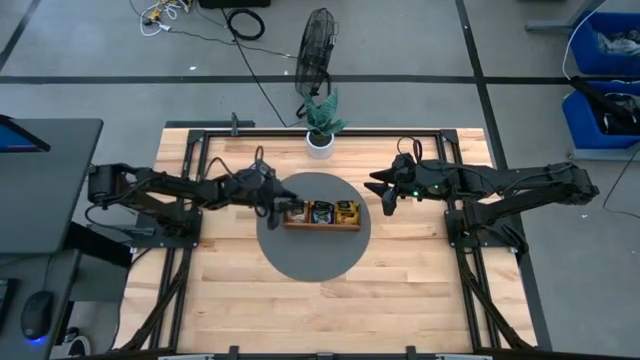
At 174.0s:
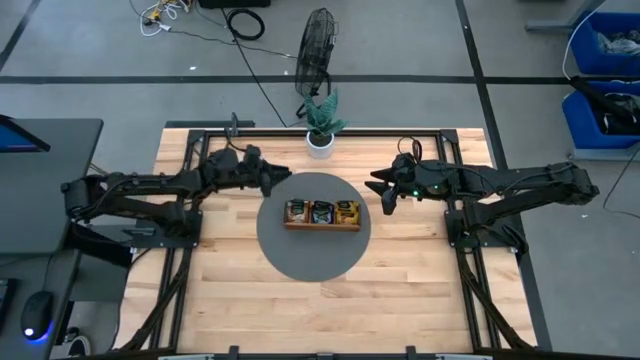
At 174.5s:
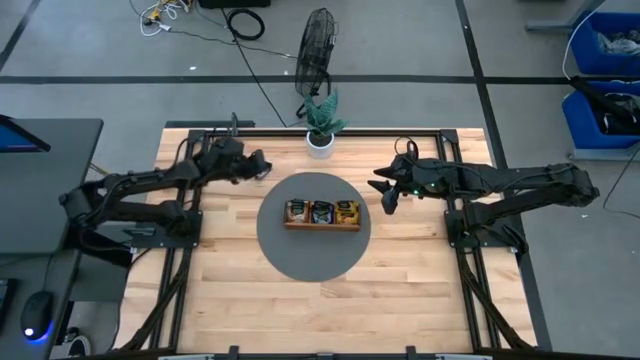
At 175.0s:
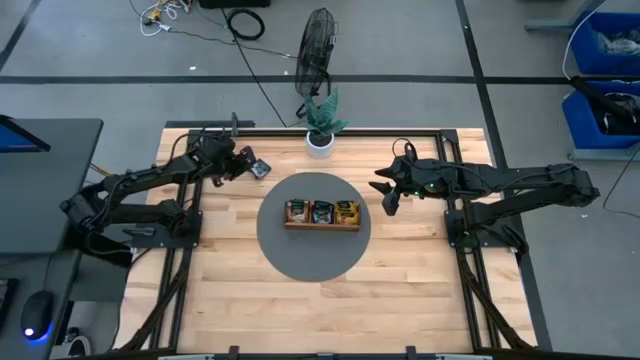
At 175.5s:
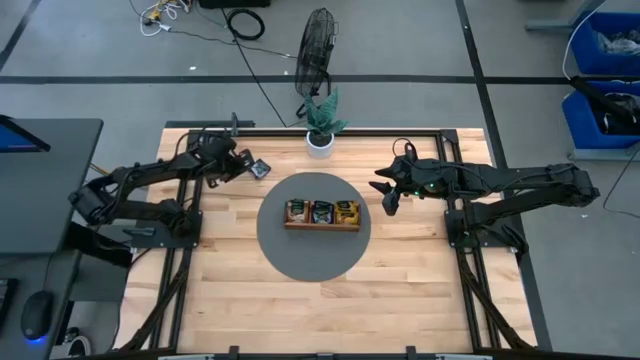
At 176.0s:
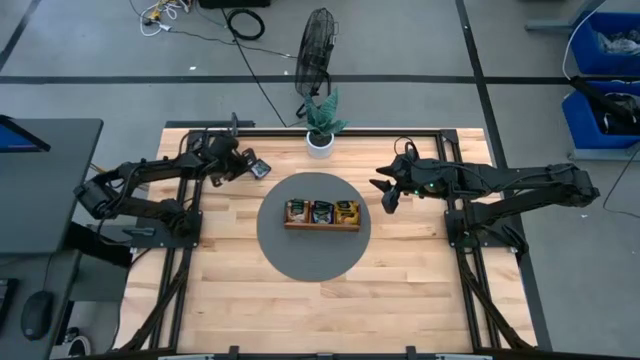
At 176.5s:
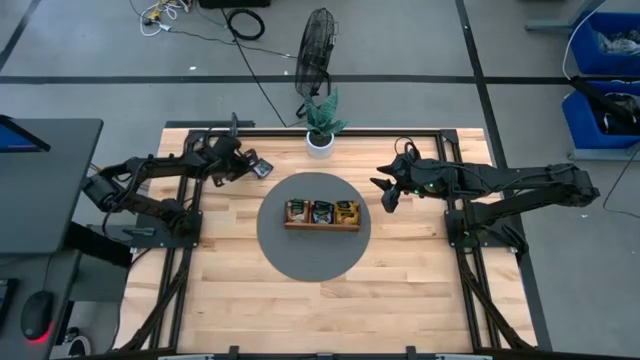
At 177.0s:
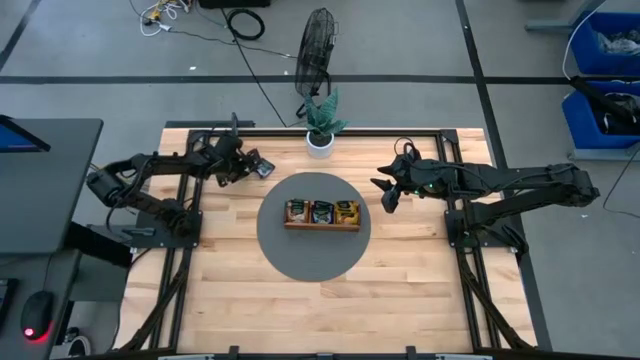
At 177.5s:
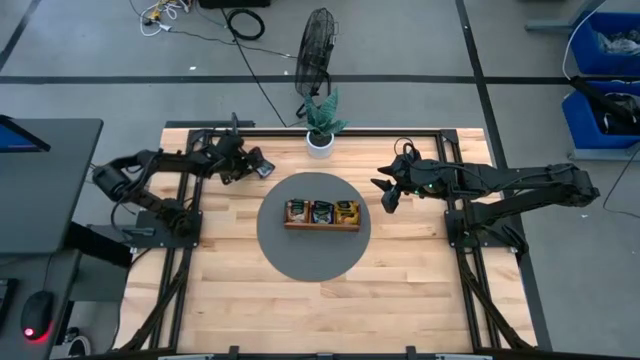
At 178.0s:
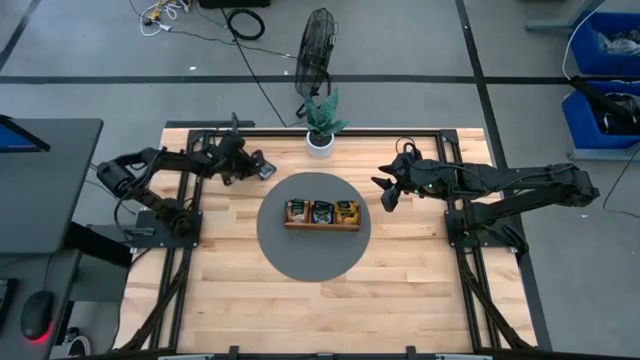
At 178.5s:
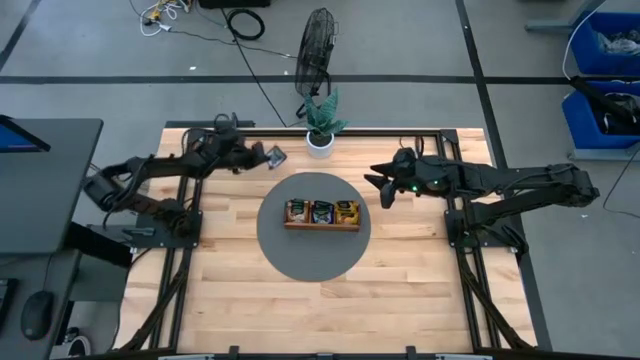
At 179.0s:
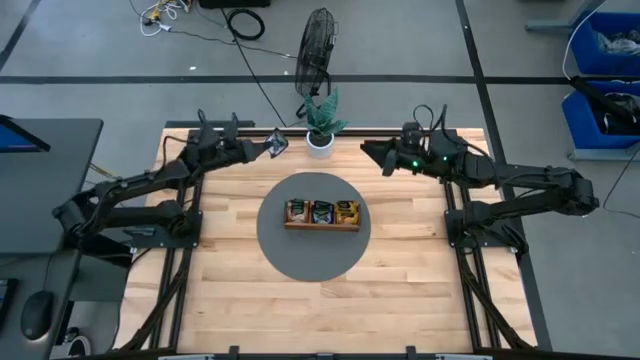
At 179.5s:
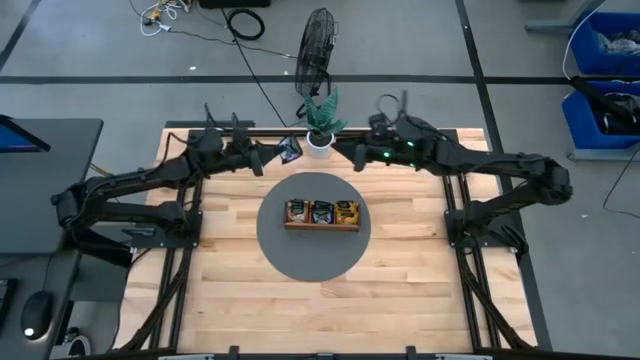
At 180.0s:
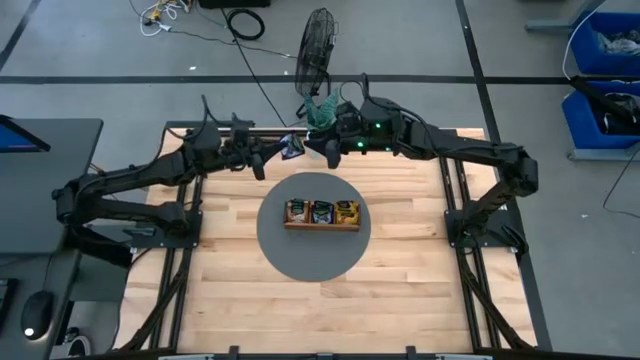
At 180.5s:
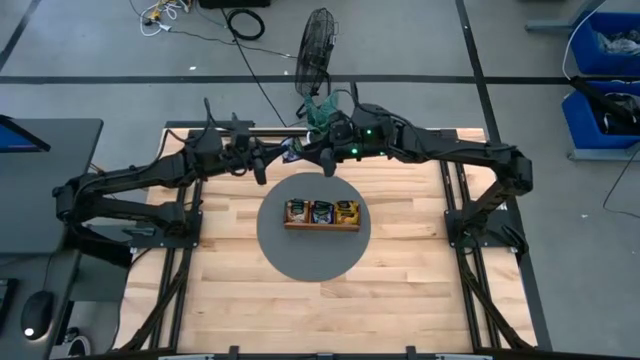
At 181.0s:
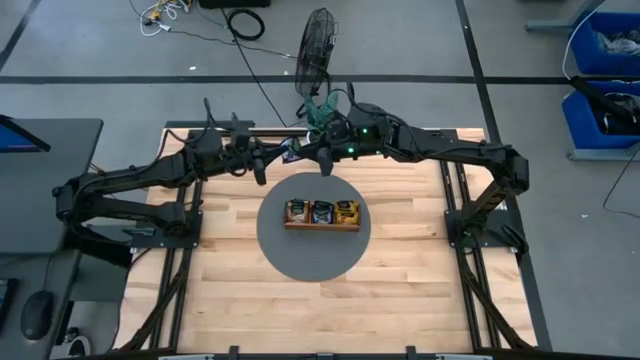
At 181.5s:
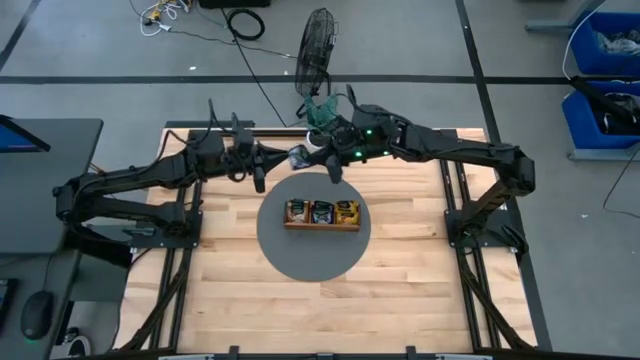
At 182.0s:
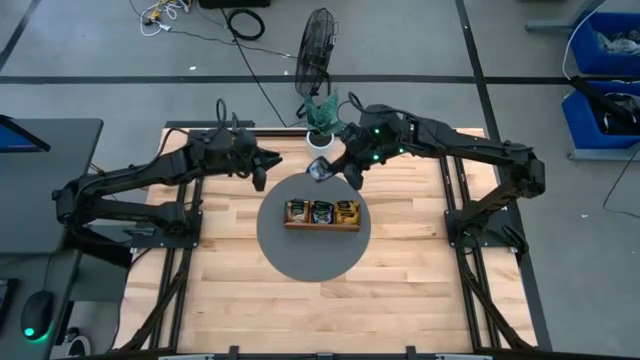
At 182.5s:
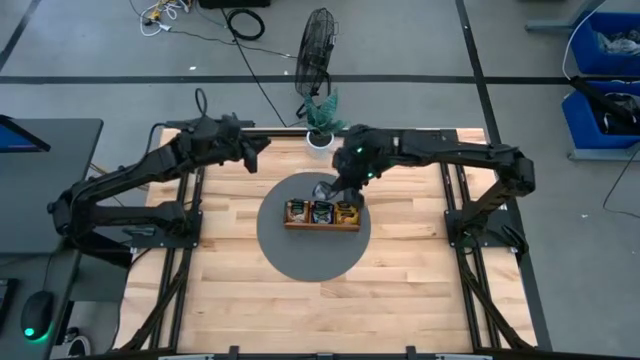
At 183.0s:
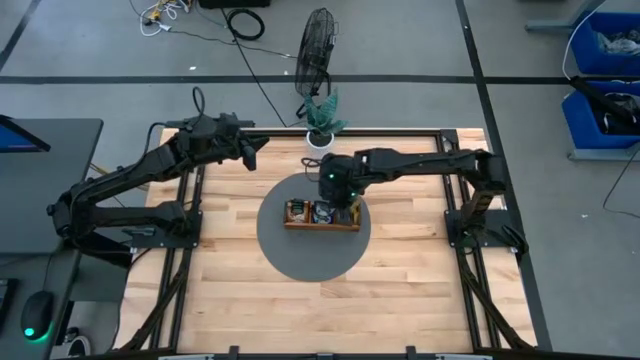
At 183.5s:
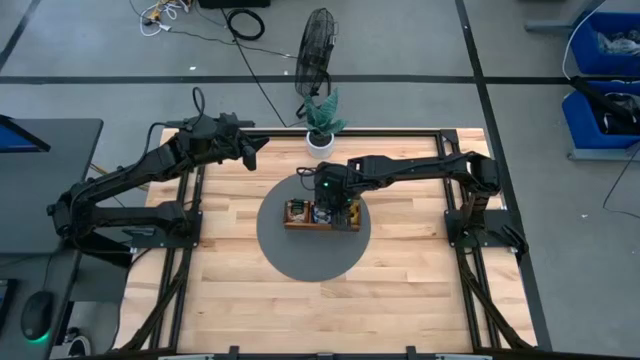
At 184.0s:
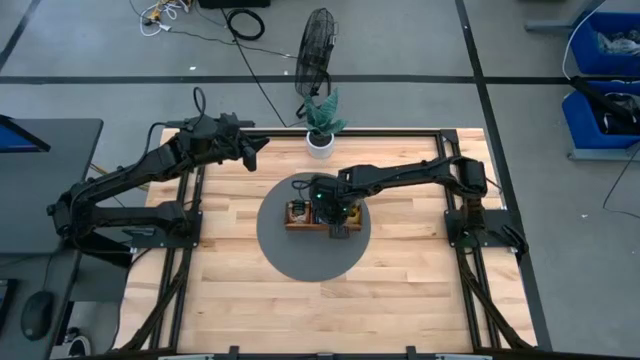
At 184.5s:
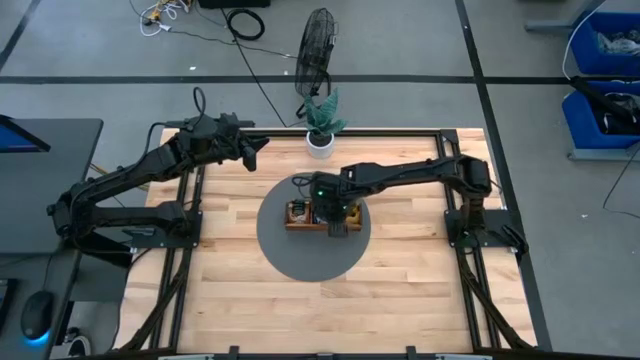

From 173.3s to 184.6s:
Task: Pick & Place Tea
Put the blue tea bag into the middle section of the wooden organizer

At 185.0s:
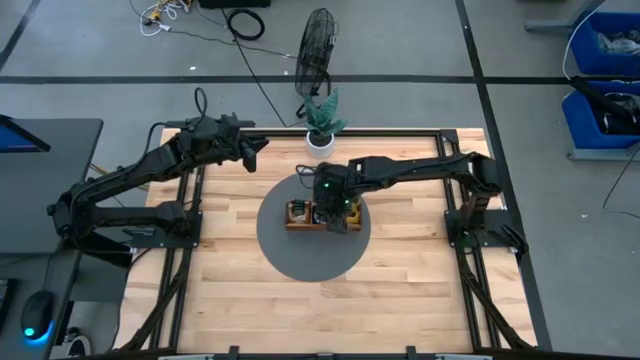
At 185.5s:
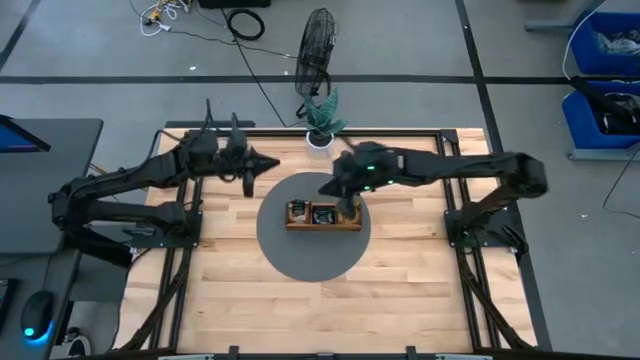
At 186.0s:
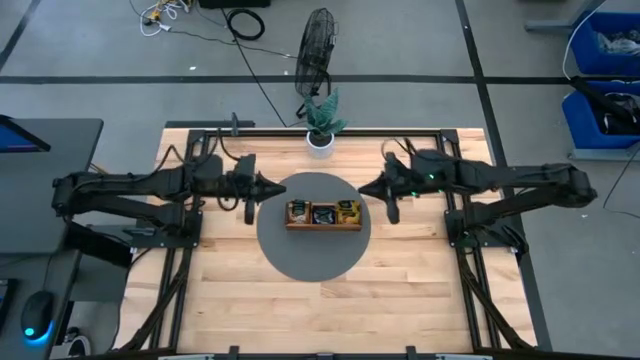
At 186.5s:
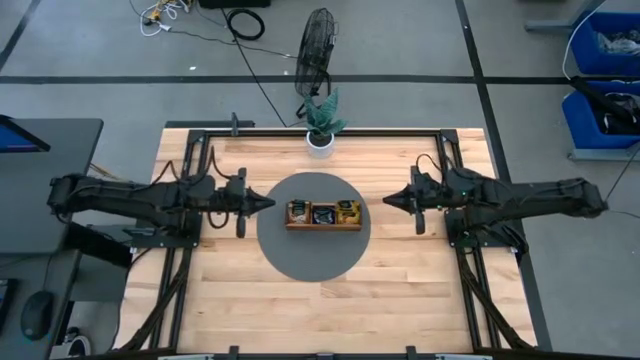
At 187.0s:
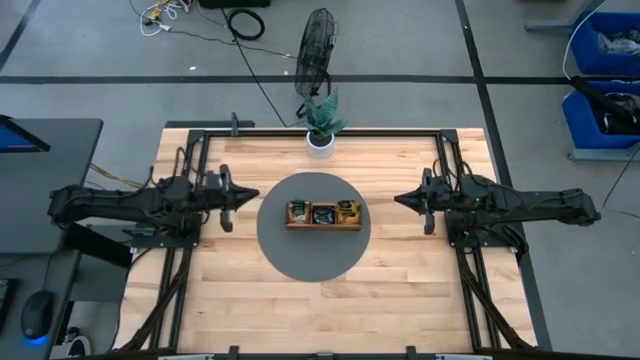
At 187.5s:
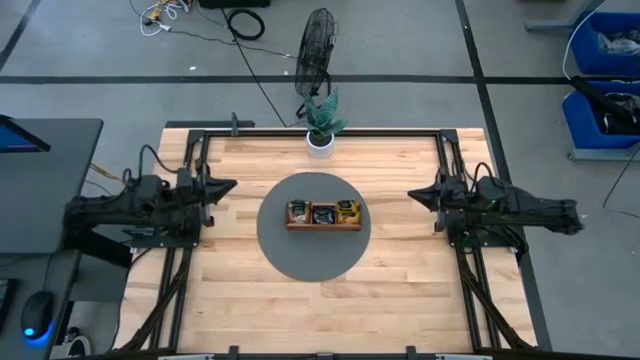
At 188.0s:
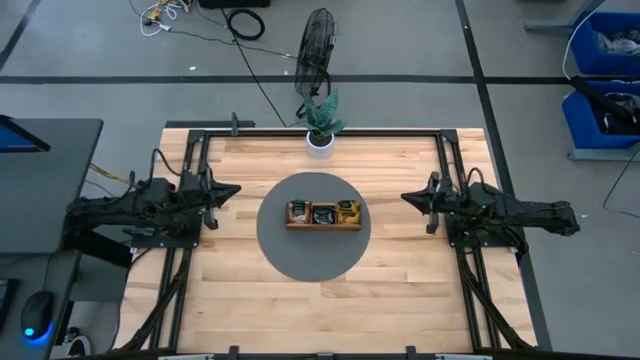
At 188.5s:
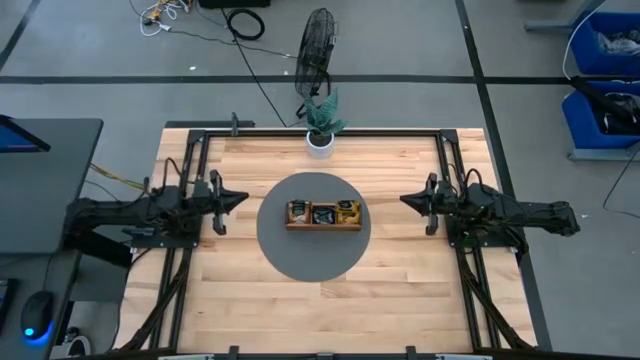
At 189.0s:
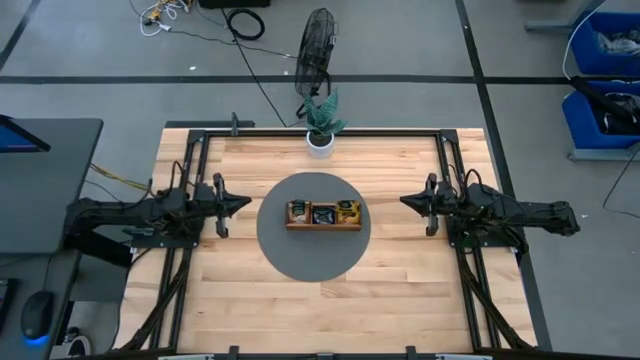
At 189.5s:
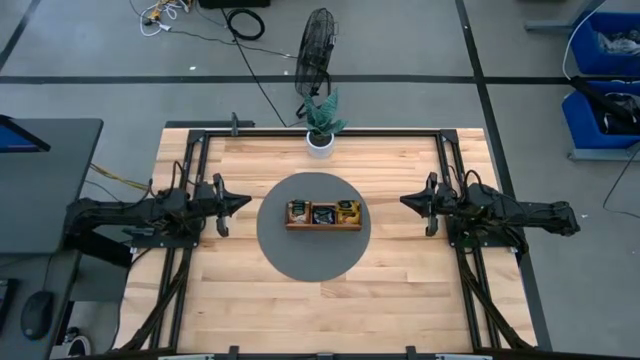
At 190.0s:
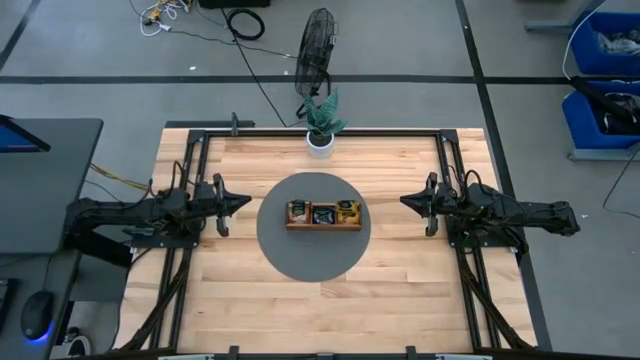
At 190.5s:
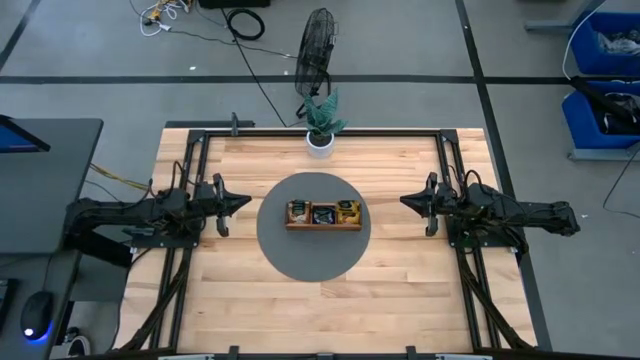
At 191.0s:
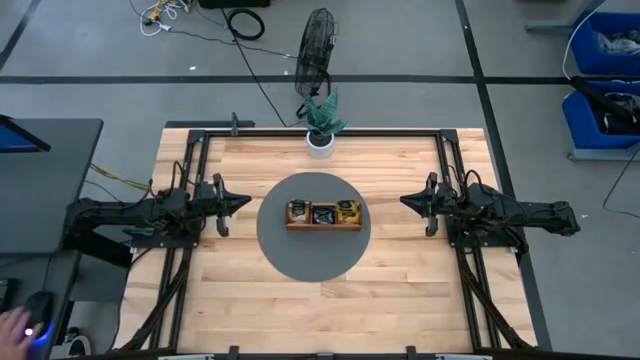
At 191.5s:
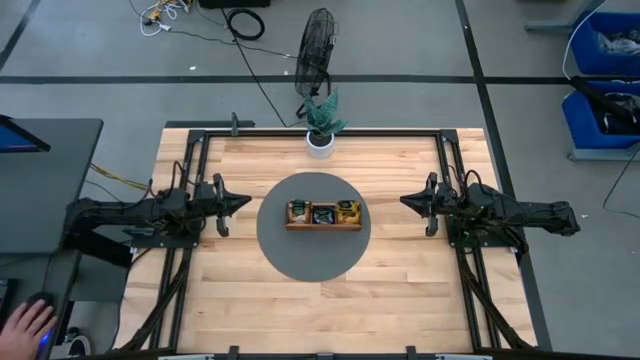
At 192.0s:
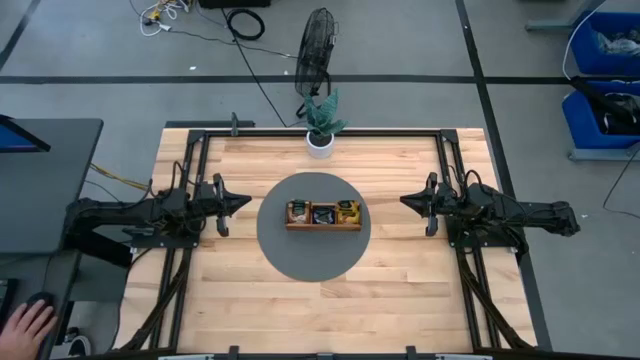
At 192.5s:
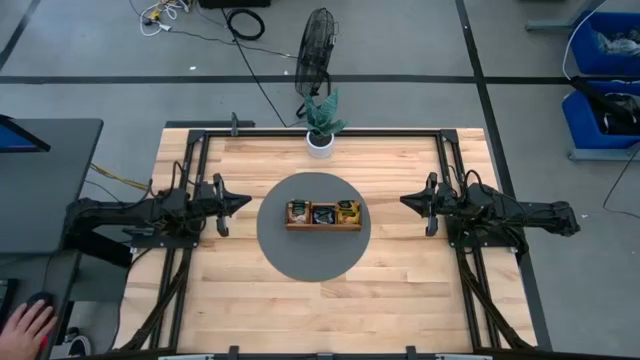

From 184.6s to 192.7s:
Return to Home Position

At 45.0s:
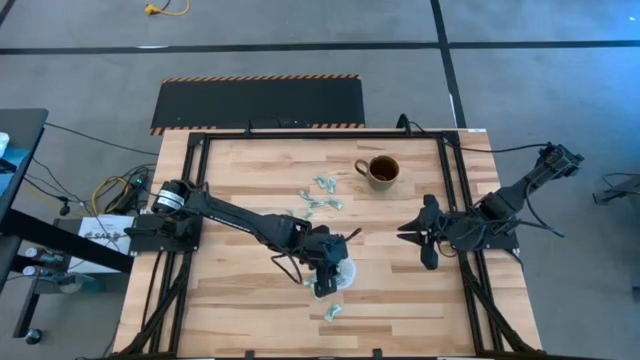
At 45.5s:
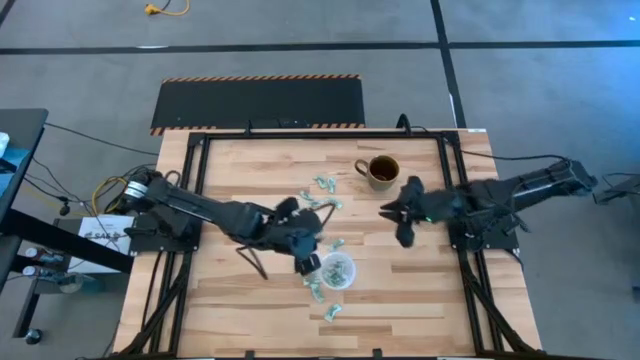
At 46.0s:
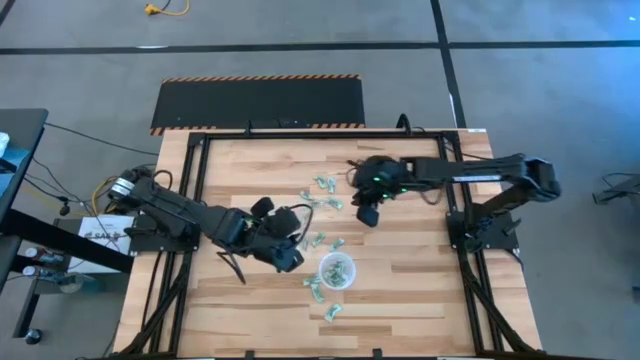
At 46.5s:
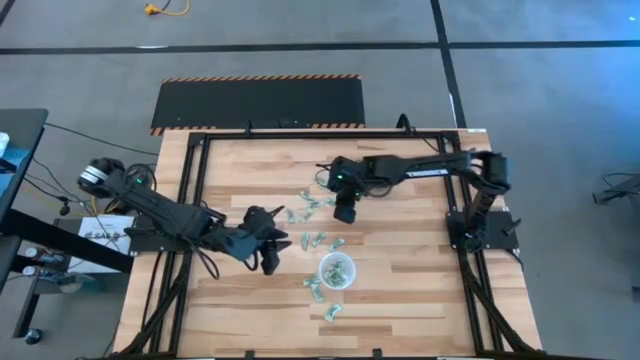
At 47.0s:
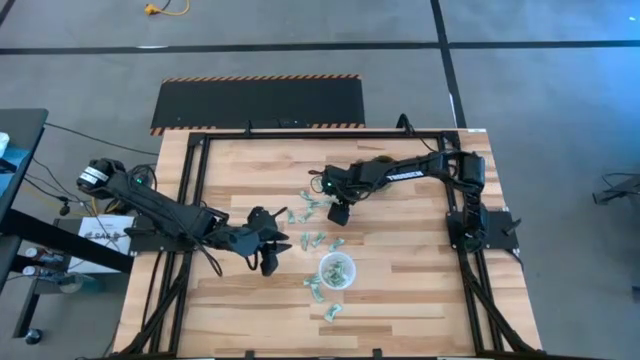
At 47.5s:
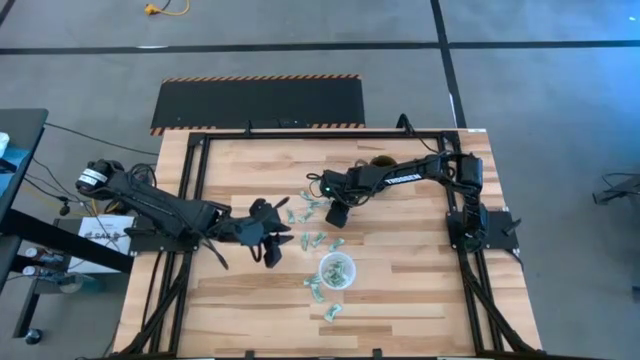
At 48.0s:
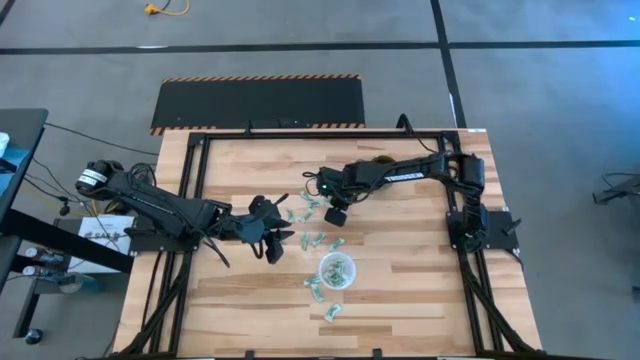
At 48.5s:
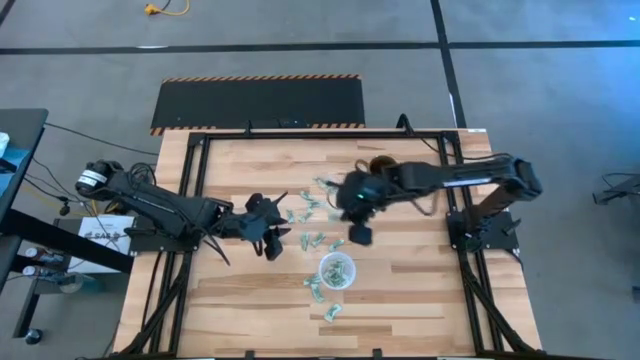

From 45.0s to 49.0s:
Task: Pick and place Stevia / Truvia into bins
Put the green stevia packet into the transparent container
